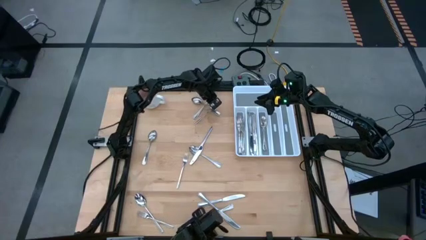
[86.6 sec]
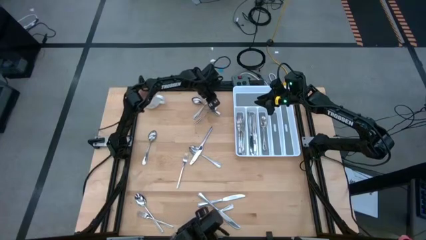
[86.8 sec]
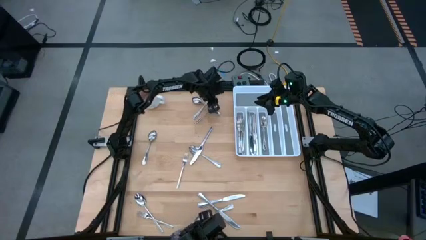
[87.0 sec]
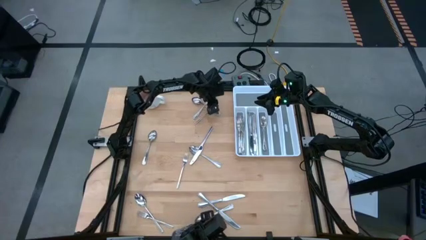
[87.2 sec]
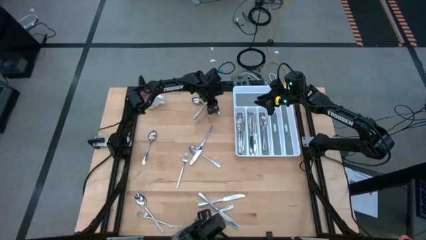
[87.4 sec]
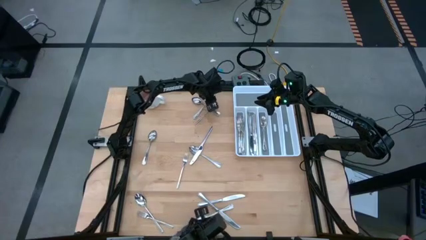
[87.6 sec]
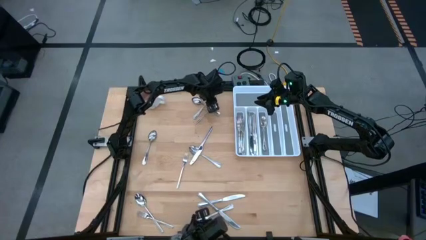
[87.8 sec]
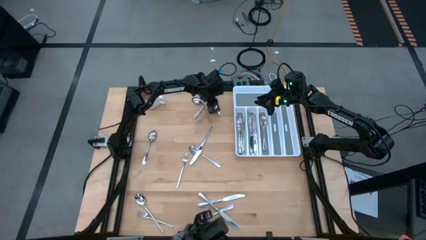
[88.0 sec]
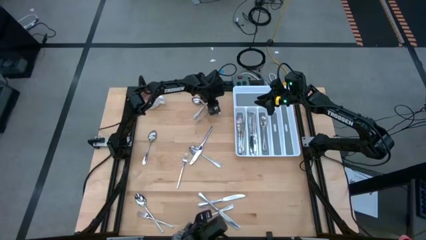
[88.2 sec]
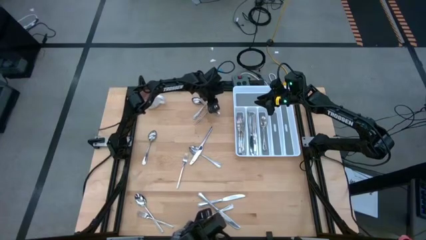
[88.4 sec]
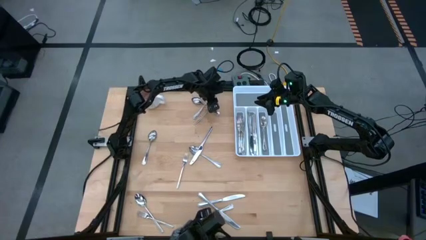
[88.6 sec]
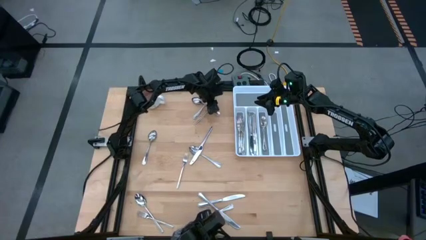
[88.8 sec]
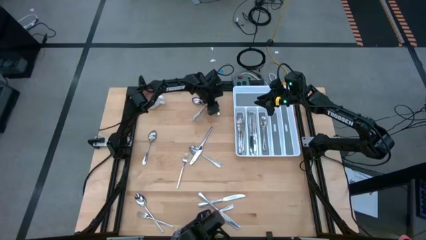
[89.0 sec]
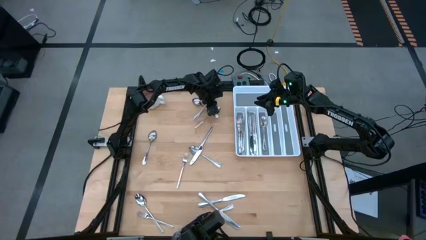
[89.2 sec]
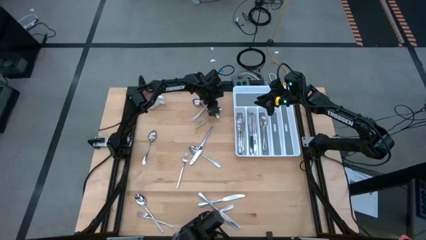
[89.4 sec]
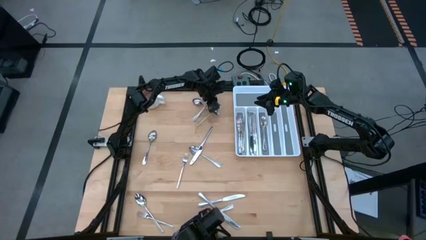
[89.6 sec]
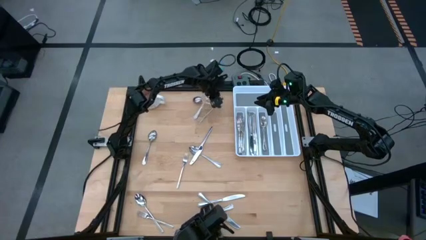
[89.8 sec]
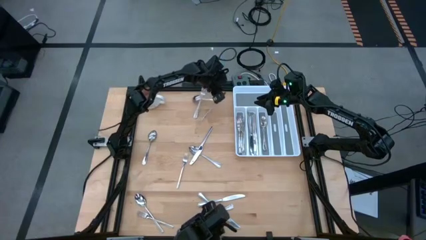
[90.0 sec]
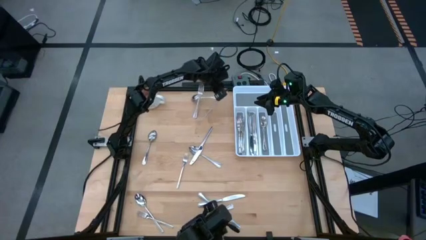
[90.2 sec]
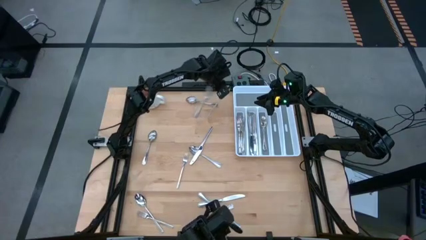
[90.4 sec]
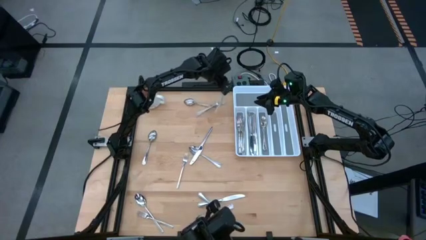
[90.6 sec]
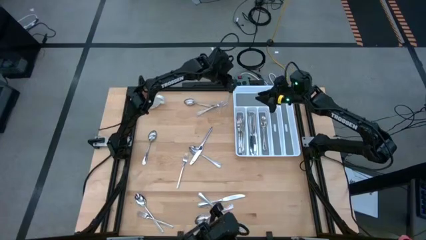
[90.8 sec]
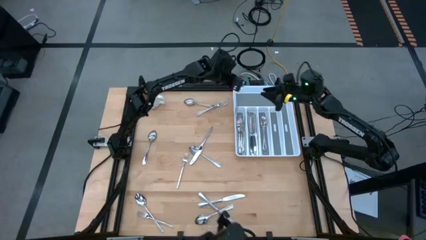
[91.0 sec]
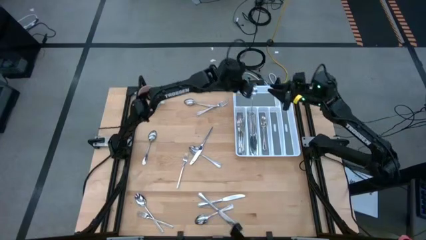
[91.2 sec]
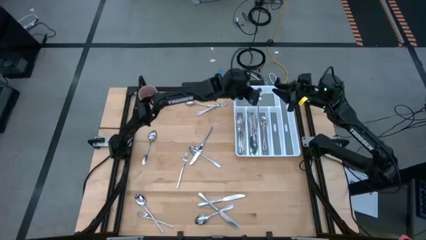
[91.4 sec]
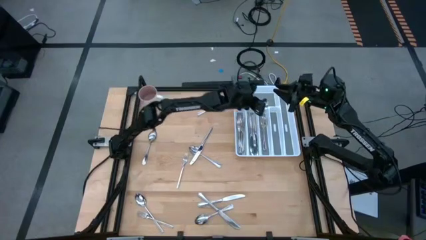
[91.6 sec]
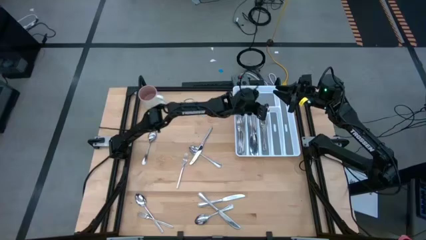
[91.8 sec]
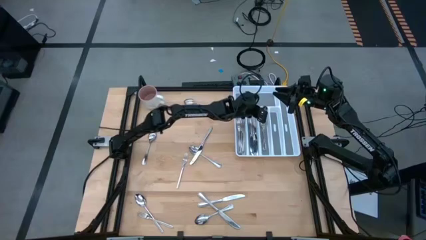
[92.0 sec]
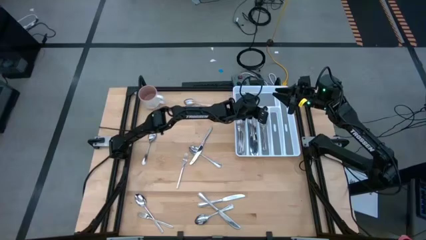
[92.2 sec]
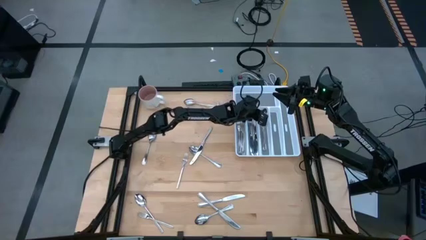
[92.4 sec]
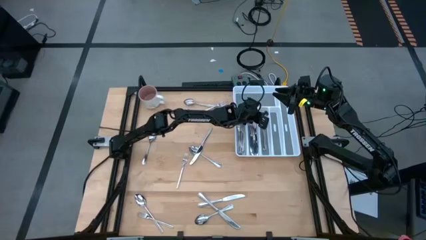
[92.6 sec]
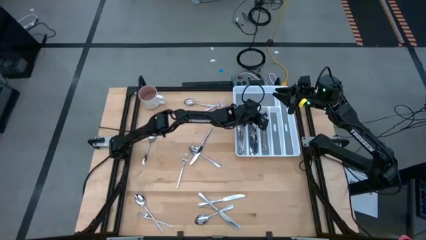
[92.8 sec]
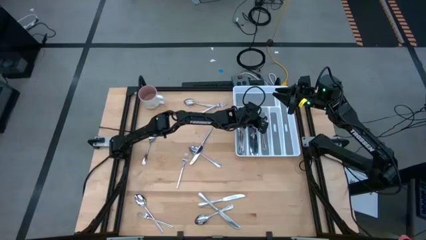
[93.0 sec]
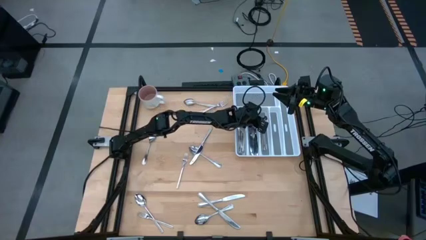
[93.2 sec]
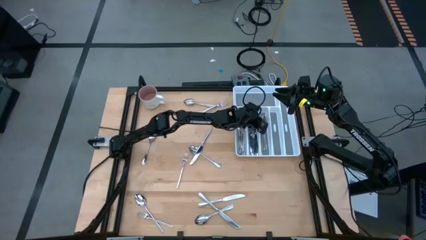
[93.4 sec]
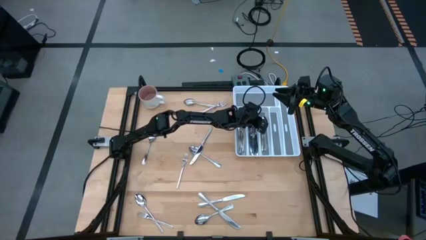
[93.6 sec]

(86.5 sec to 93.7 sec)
Task: Sort silverware
Put the silver spoon into the middle right slot of the white silverware tray

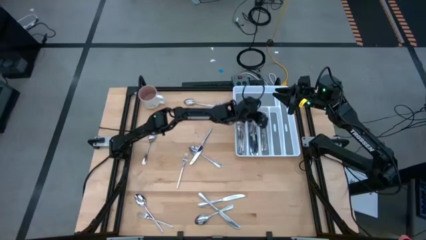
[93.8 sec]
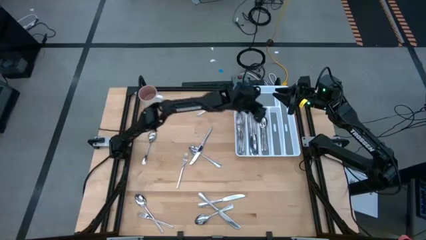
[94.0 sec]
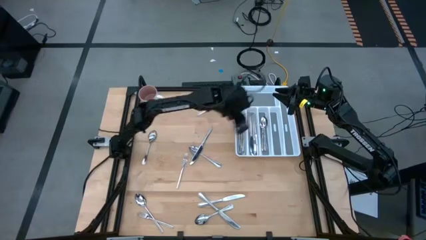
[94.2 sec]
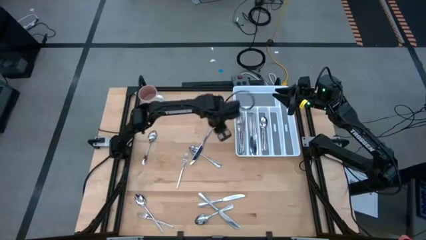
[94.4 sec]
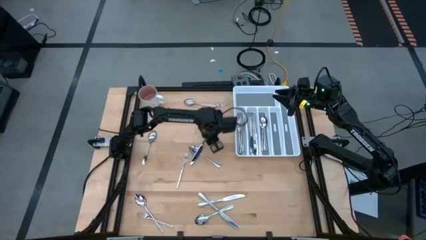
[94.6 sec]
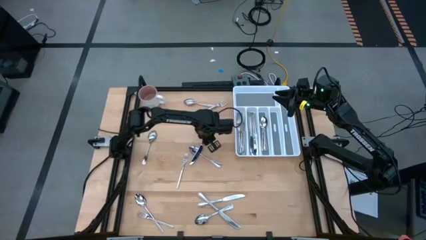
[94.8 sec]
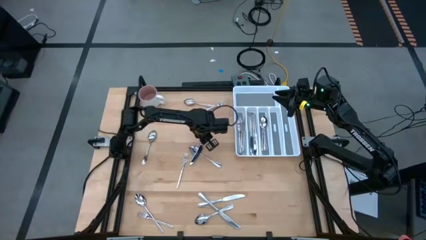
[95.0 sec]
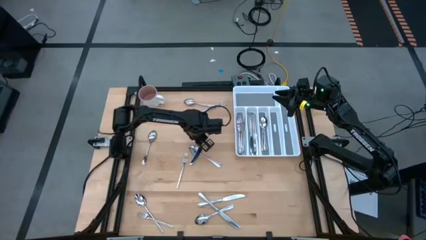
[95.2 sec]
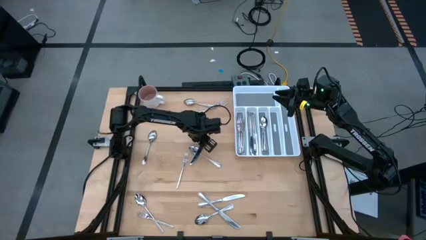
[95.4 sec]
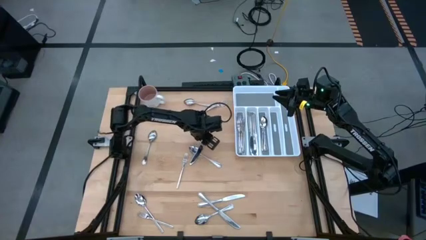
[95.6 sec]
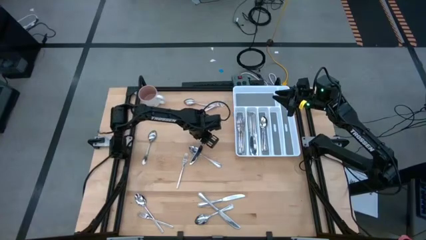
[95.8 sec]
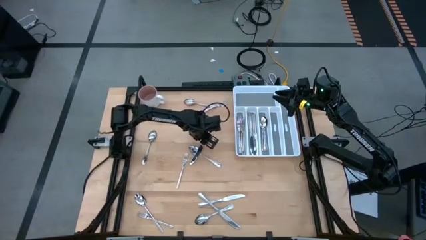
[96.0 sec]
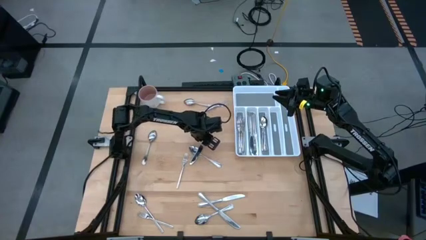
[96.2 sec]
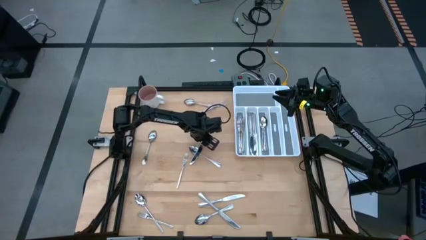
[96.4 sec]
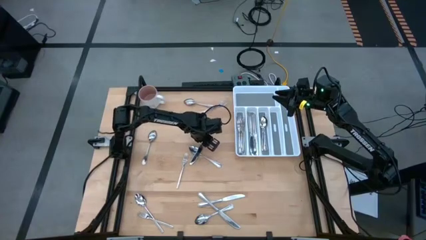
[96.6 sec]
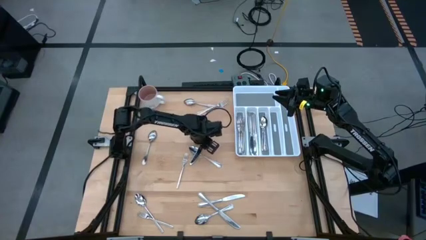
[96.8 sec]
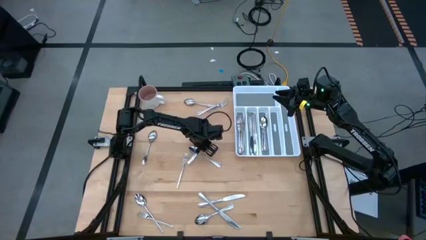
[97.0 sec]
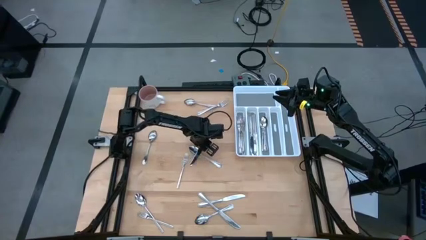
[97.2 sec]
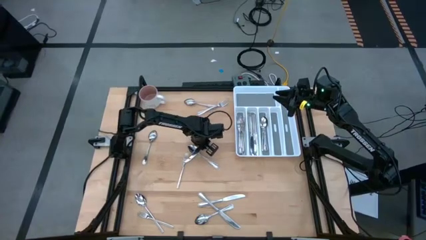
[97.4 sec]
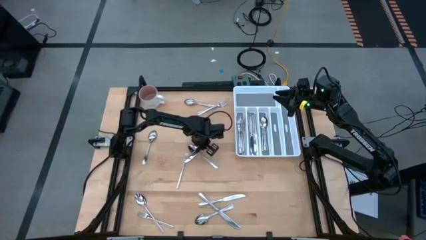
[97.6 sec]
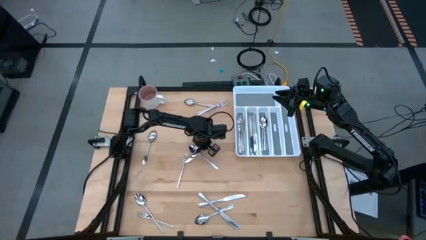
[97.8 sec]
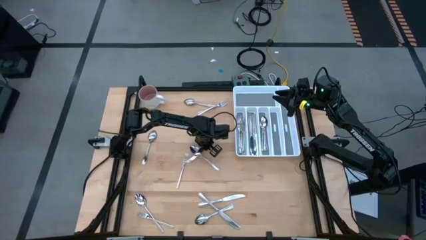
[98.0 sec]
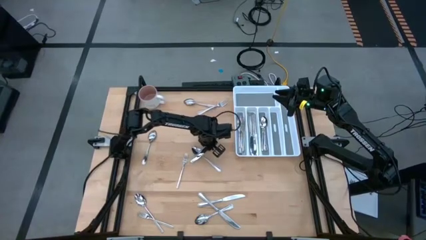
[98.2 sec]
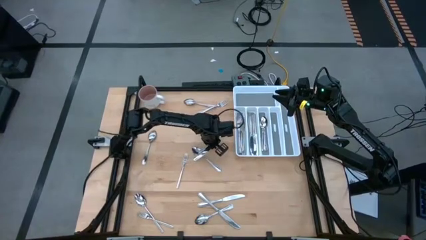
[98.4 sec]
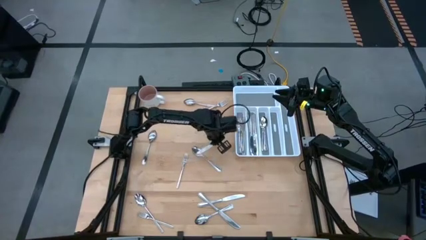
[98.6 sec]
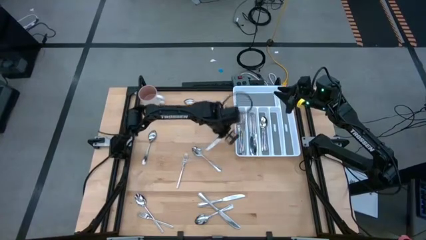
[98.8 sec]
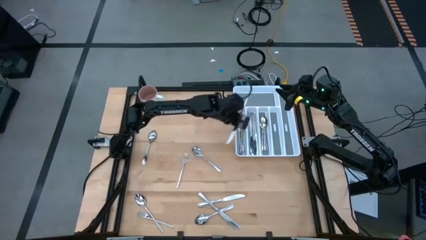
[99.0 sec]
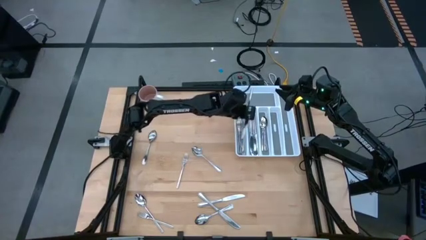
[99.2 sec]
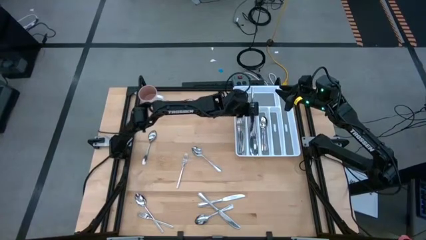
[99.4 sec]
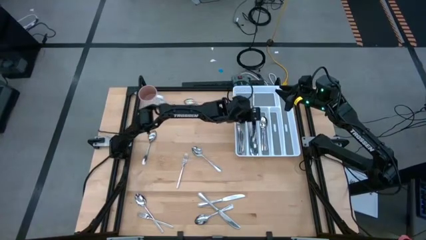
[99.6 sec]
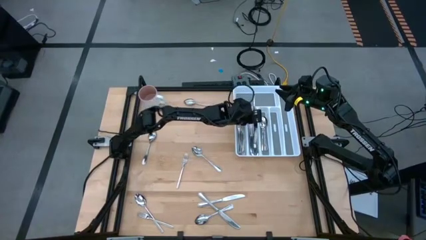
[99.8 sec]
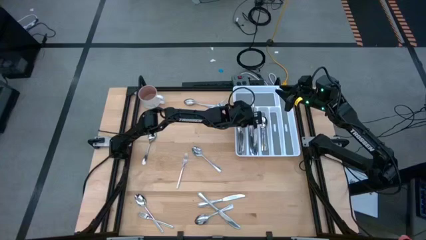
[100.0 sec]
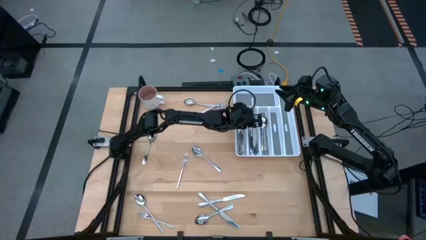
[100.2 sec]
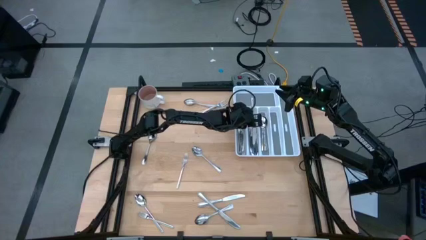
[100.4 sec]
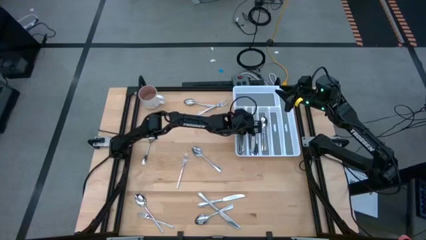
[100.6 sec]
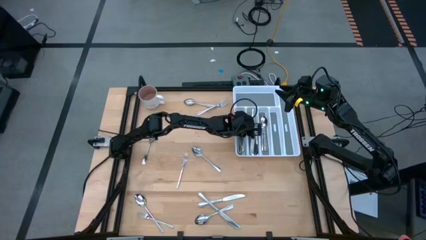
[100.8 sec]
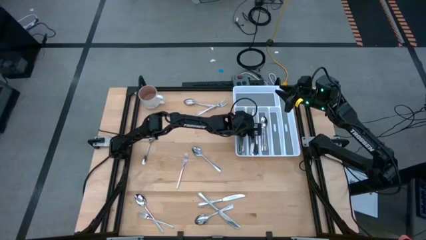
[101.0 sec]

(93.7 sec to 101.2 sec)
Put the silver knife into the middle left slot of the white silverware tray
